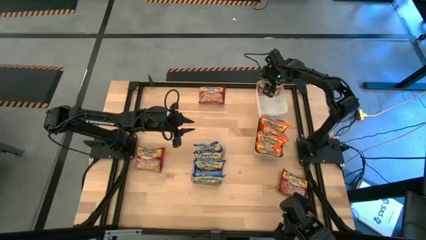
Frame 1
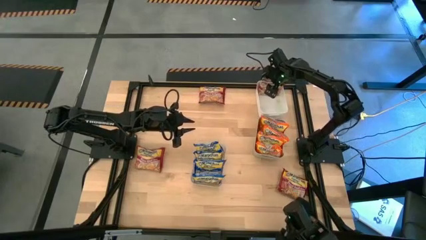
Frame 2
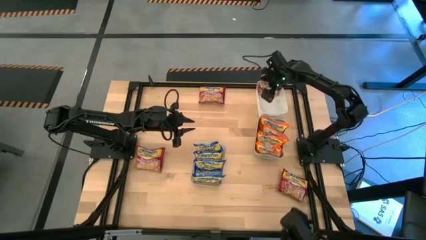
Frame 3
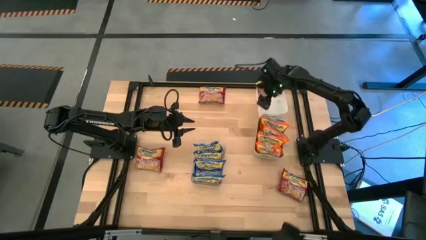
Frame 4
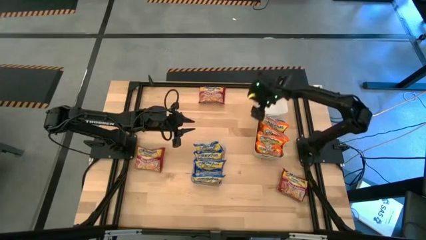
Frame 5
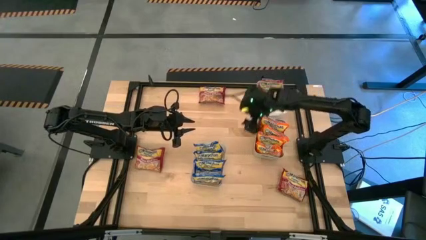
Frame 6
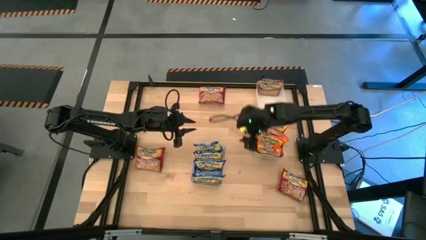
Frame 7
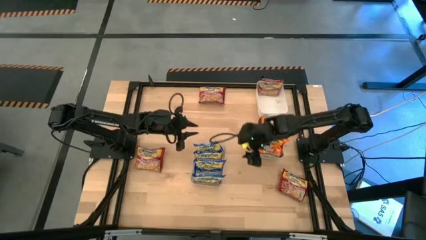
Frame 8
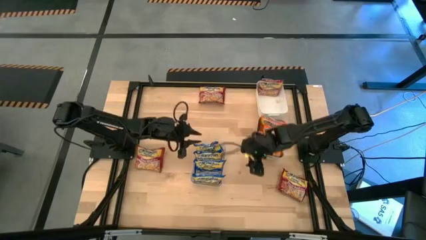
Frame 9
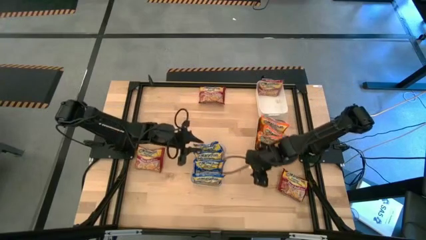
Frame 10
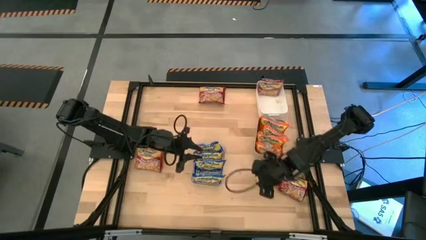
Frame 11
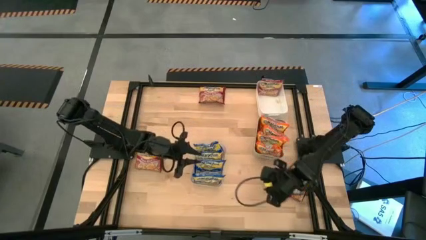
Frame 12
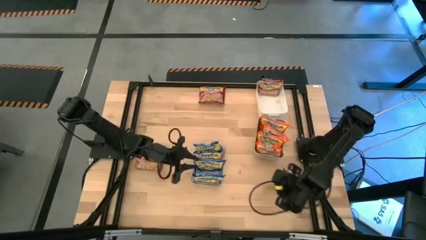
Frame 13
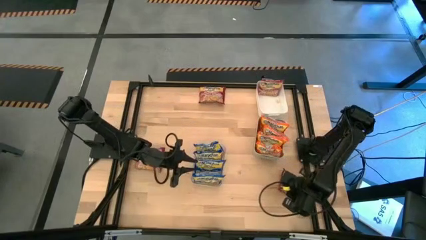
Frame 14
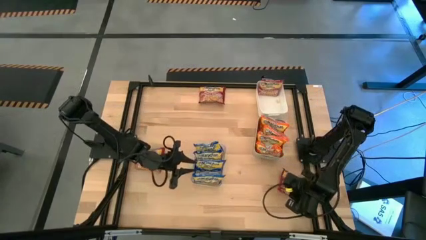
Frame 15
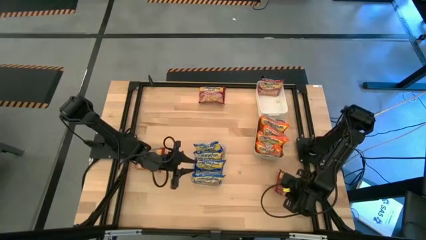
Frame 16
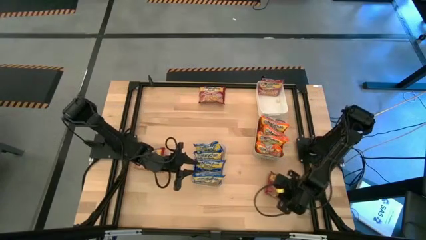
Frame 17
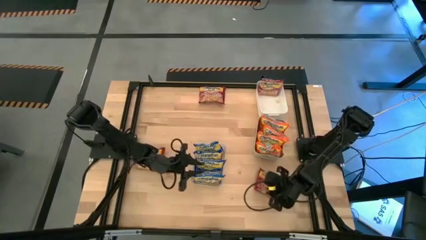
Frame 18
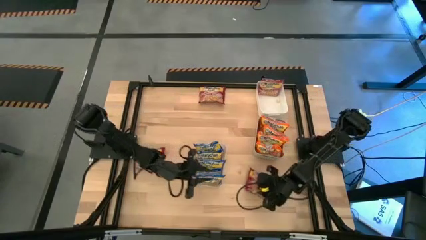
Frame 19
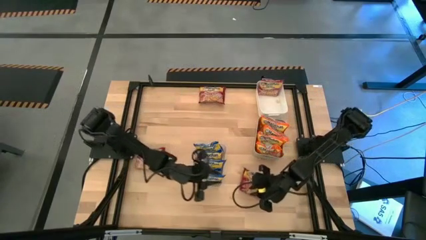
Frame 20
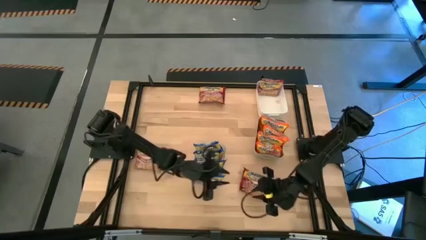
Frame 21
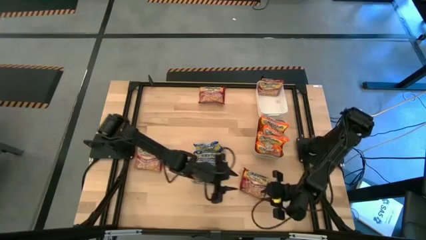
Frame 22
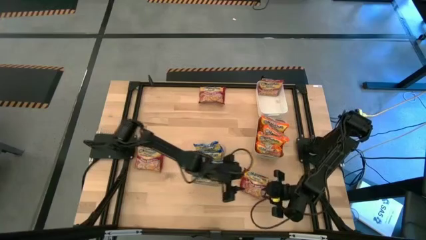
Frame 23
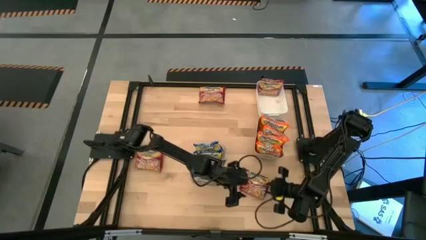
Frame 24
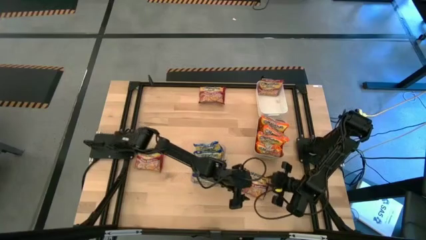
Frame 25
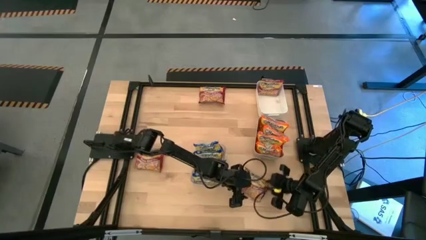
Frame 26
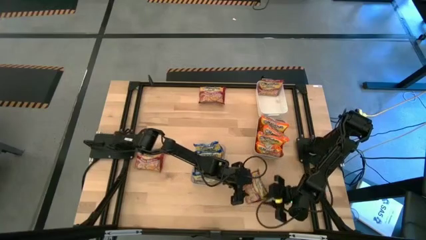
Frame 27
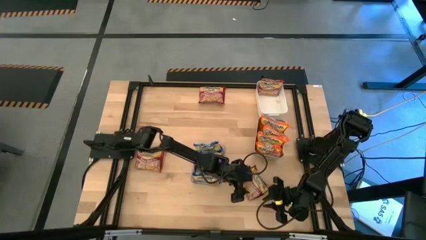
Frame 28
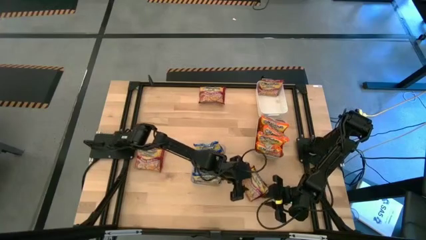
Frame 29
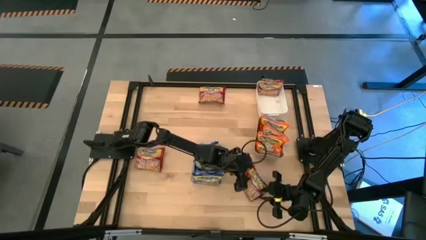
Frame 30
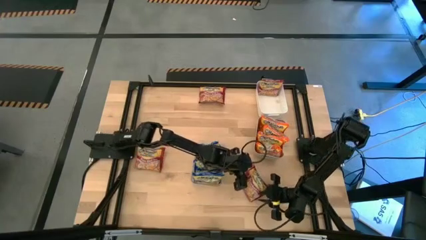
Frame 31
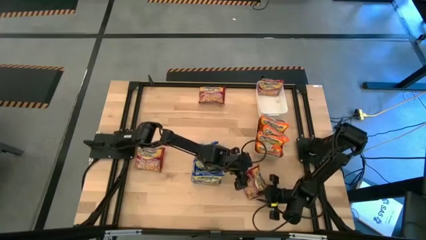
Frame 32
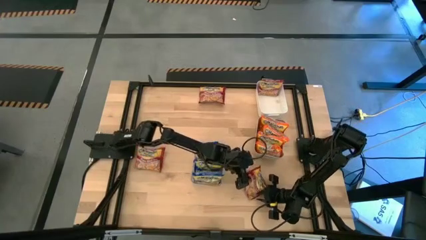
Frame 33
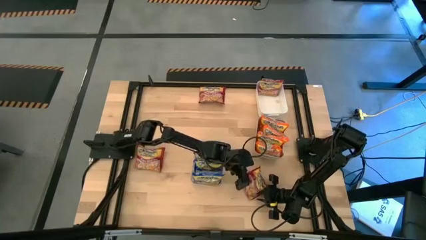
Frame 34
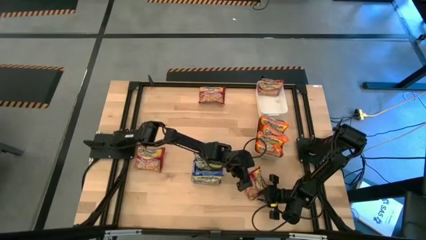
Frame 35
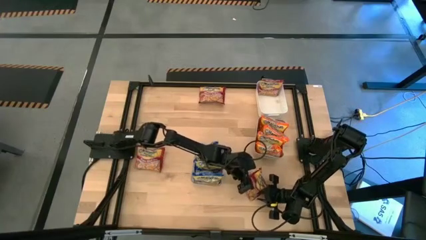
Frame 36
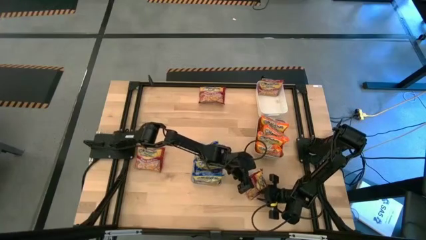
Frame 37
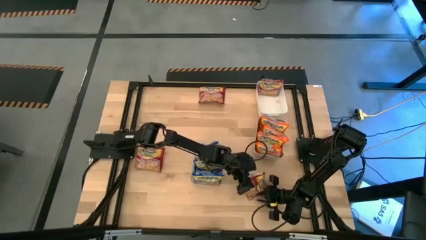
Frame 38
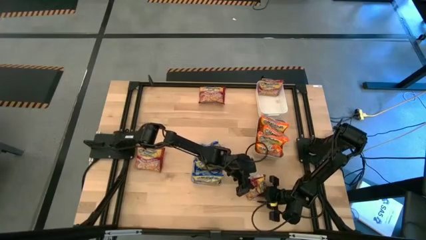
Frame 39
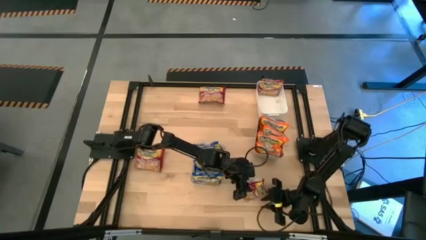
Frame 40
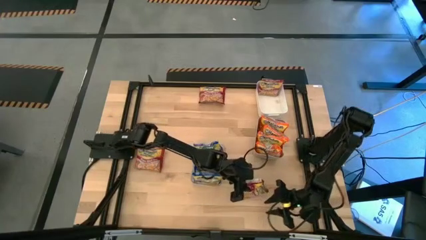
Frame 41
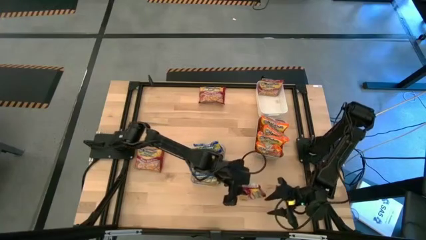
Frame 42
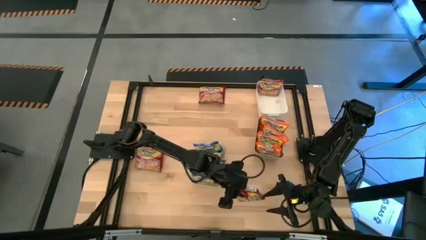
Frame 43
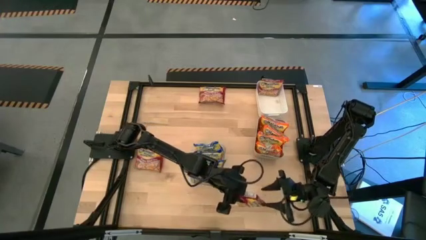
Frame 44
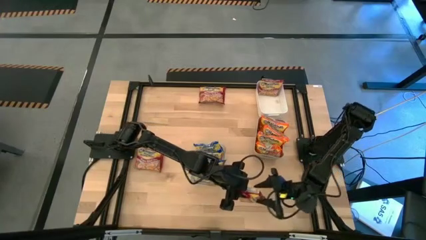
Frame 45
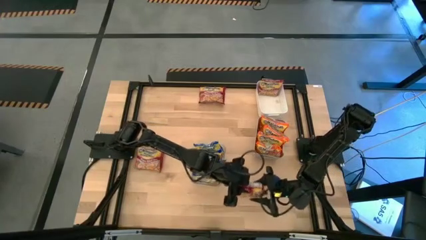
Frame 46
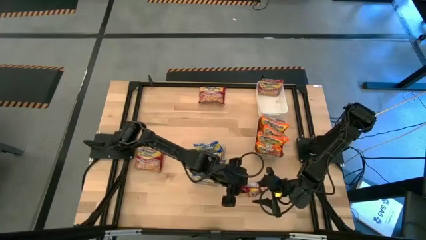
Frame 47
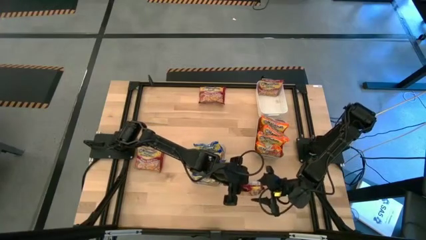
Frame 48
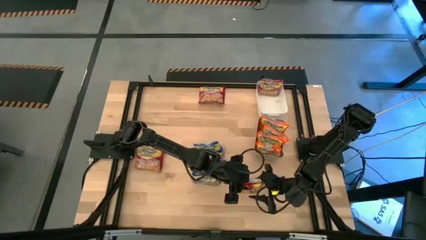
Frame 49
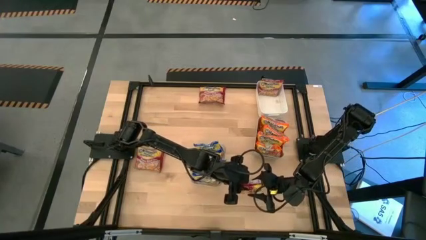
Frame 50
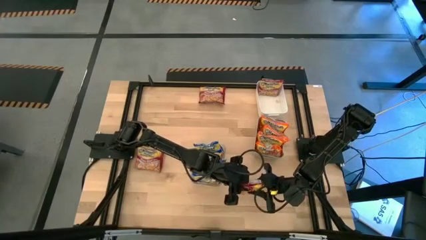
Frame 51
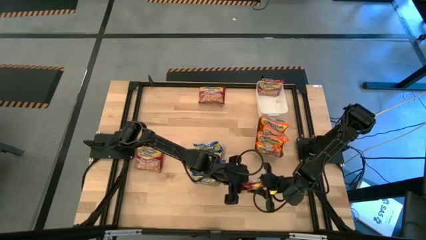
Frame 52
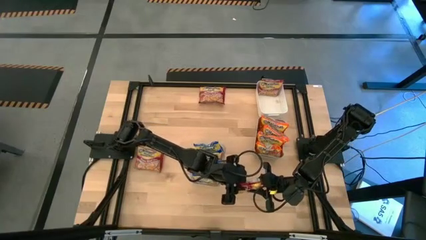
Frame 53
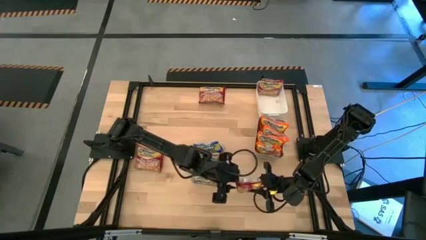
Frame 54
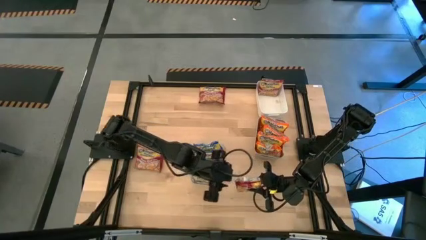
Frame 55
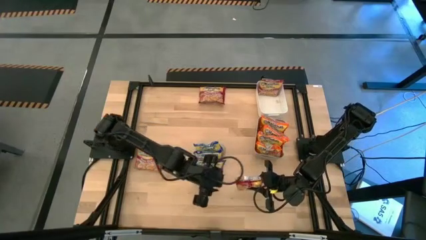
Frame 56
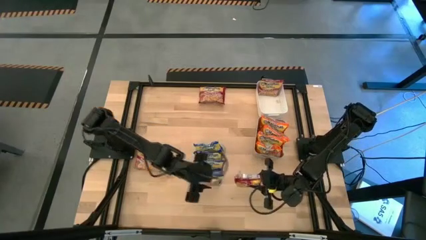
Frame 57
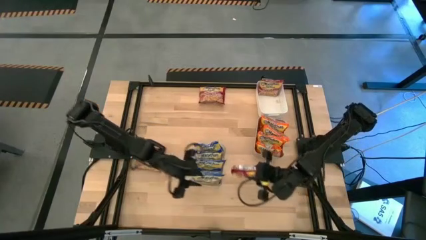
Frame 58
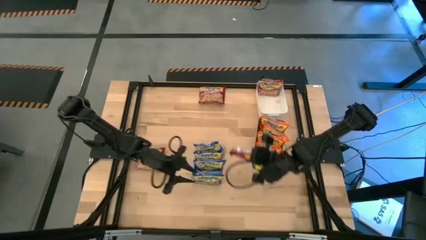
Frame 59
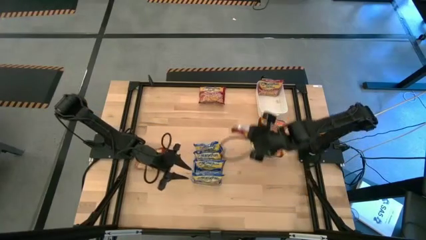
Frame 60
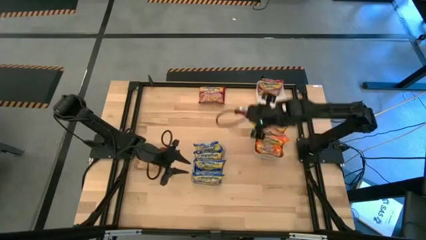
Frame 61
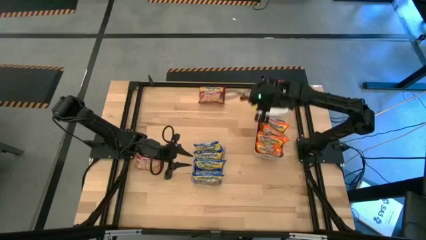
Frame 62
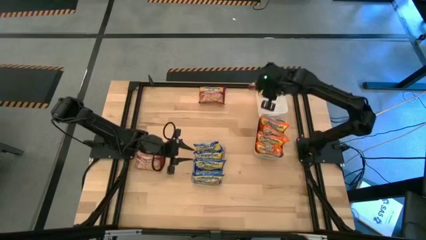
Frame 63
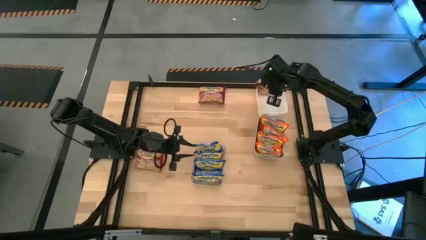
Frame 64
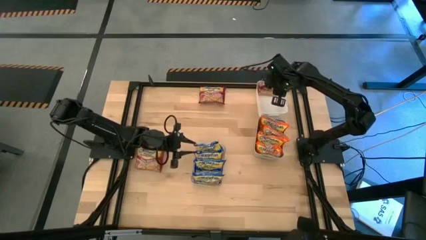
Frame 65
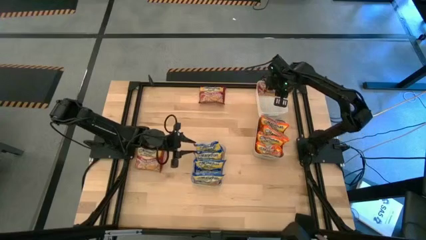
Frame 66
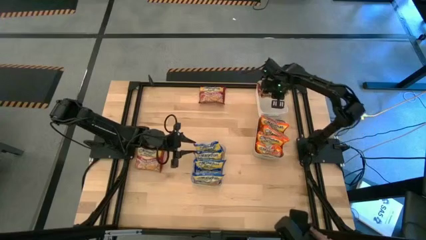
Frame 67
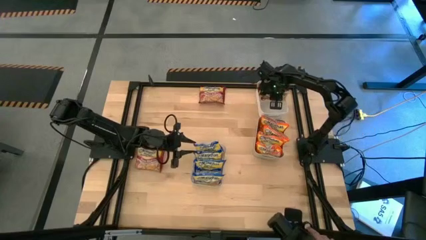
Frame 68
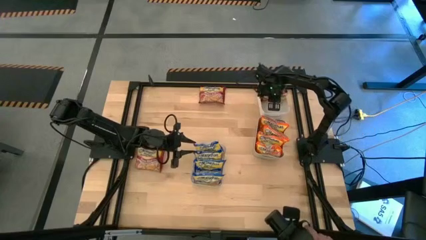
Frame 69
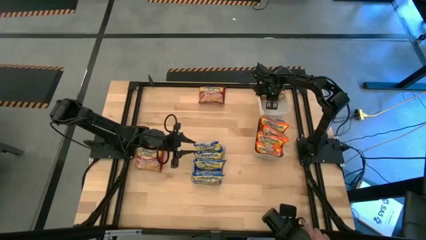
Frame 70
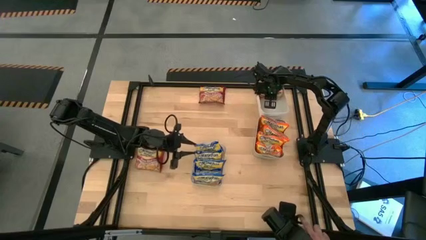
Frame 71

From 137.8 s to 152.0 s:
Task: Sort Maruchan noodles
Put the bottom right red noodle pack into the white bin
